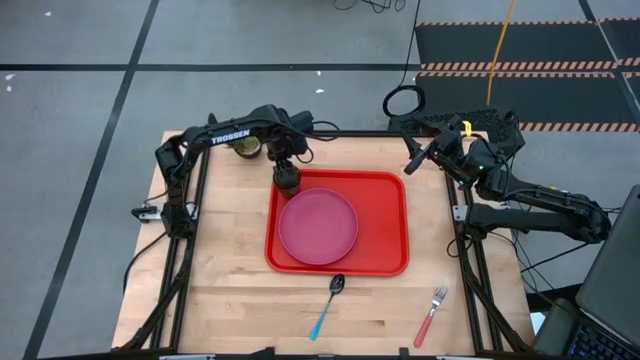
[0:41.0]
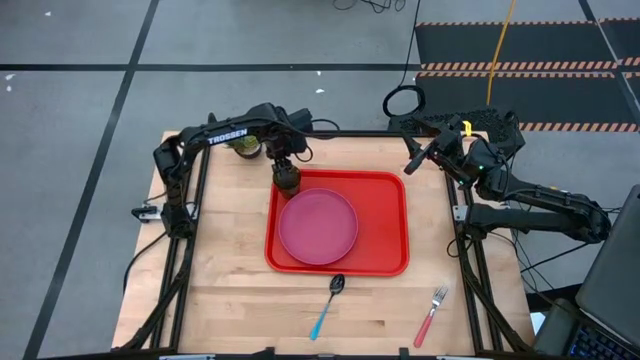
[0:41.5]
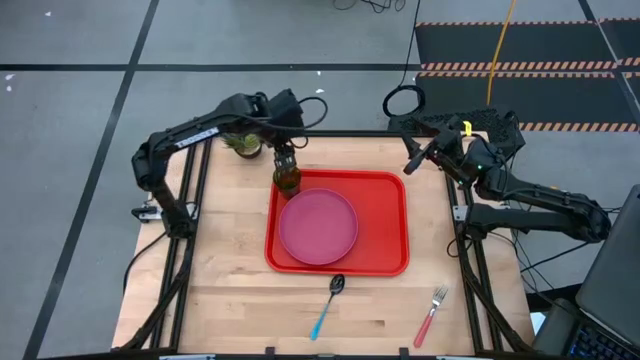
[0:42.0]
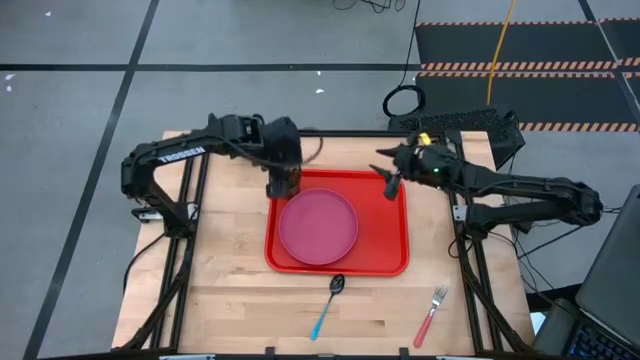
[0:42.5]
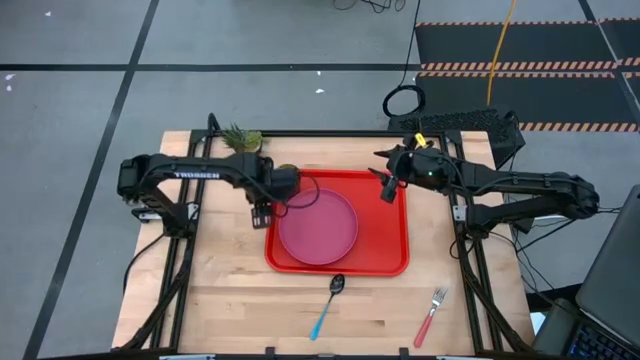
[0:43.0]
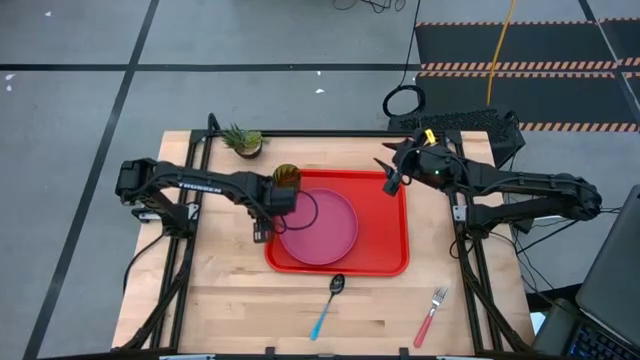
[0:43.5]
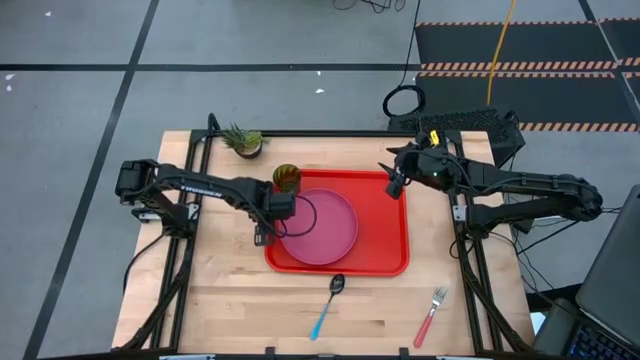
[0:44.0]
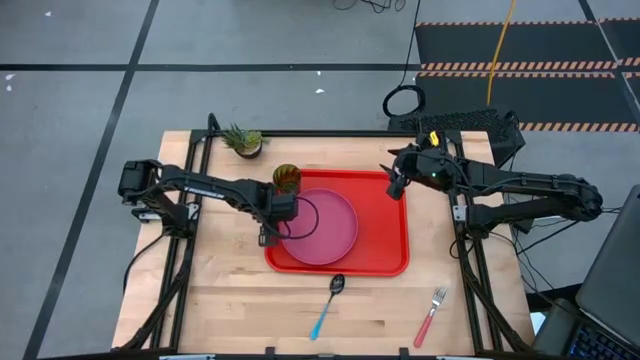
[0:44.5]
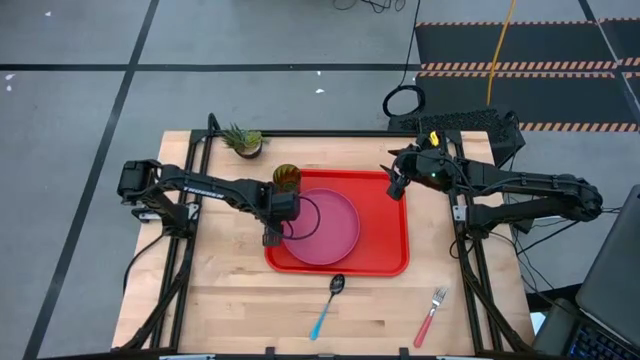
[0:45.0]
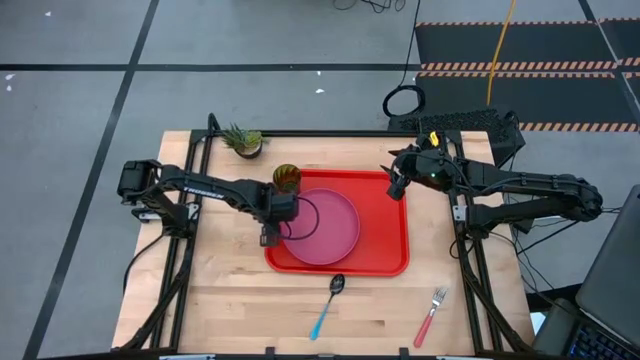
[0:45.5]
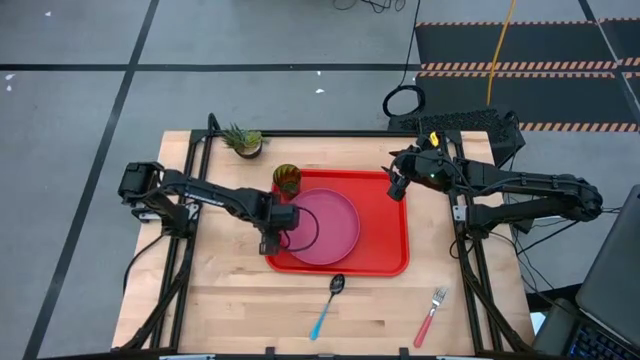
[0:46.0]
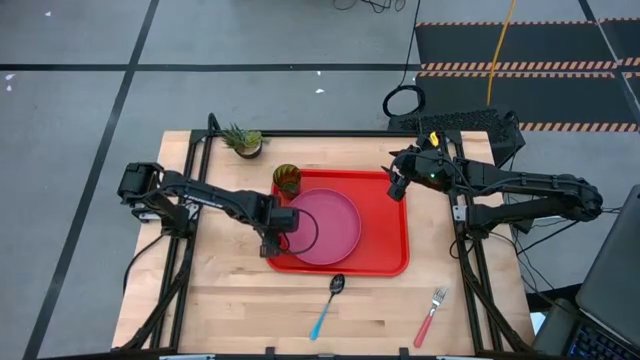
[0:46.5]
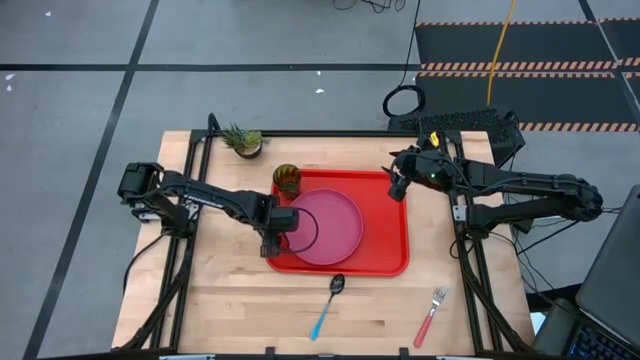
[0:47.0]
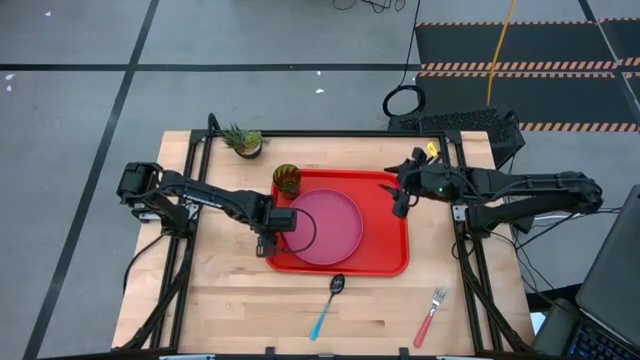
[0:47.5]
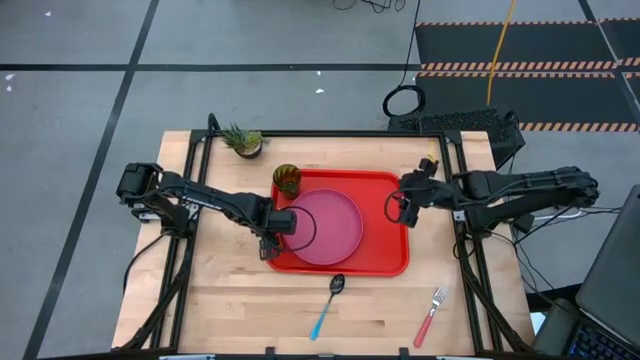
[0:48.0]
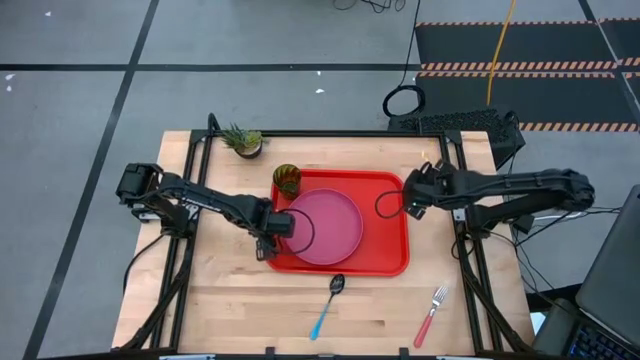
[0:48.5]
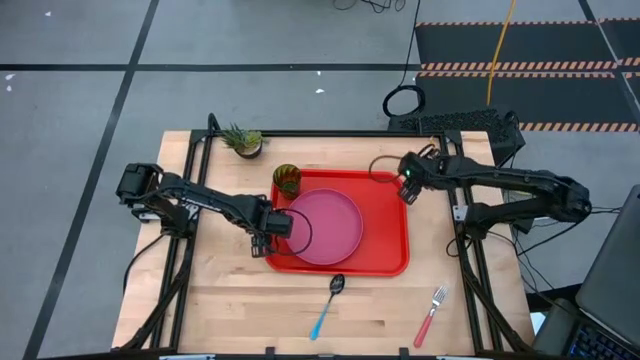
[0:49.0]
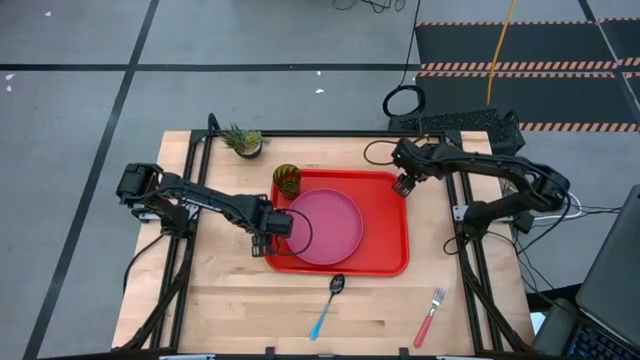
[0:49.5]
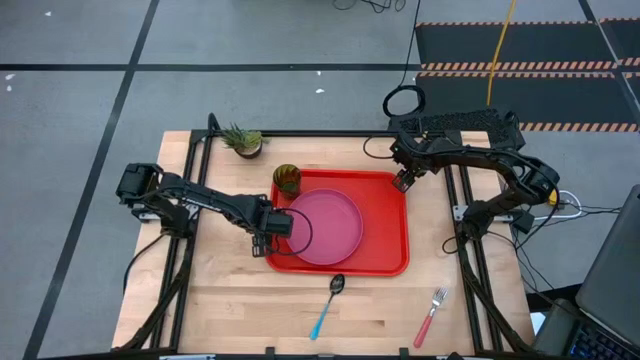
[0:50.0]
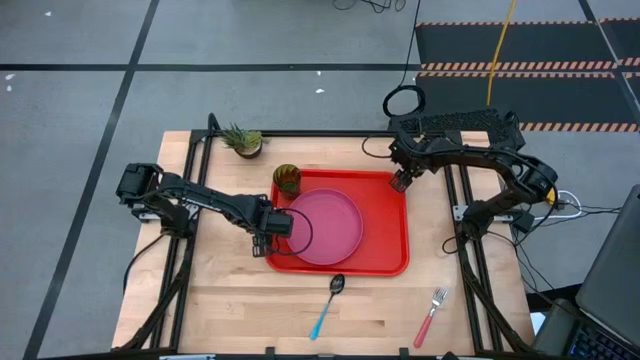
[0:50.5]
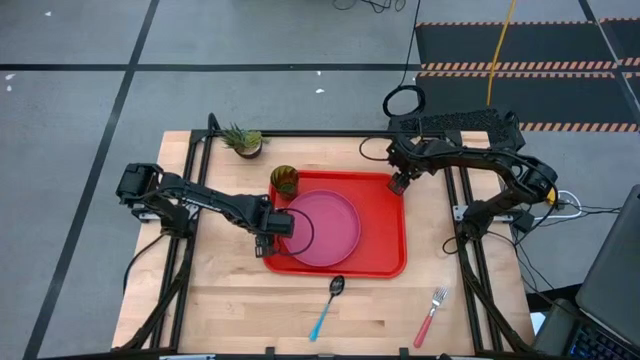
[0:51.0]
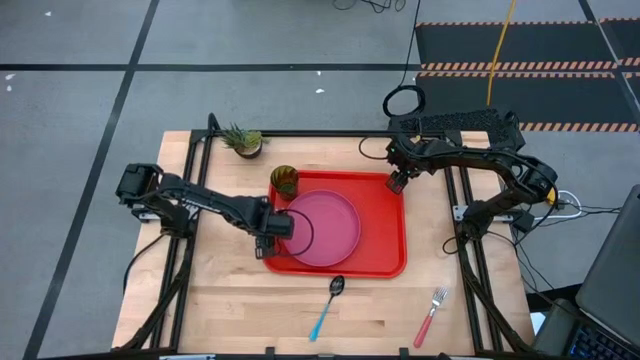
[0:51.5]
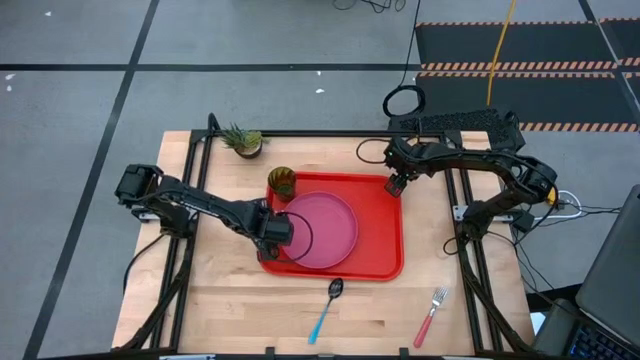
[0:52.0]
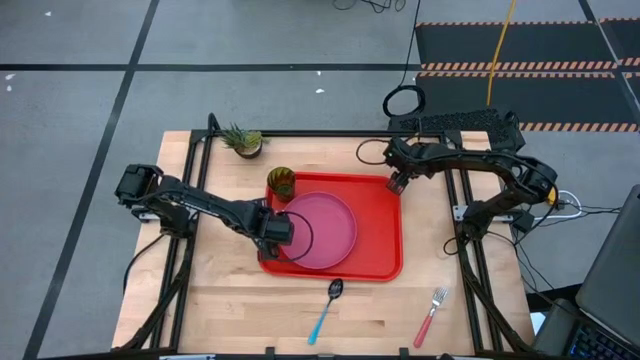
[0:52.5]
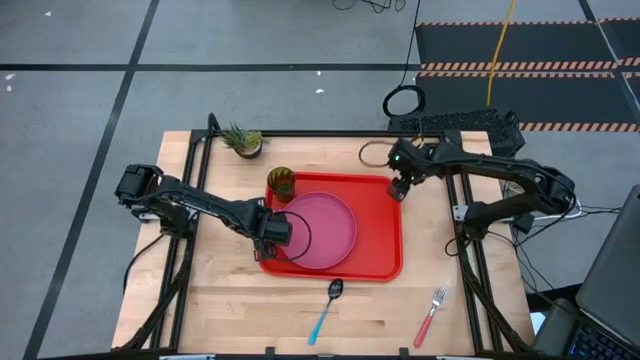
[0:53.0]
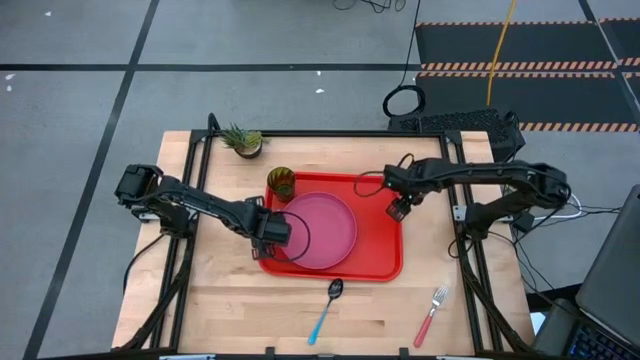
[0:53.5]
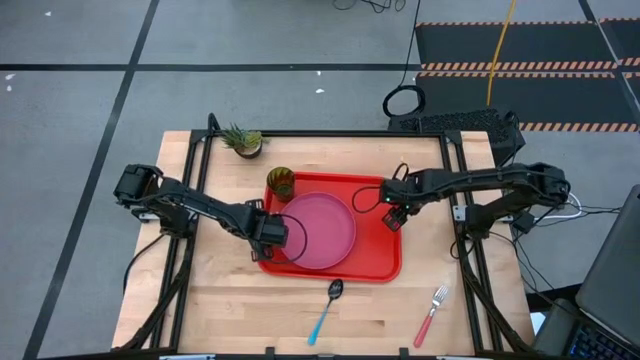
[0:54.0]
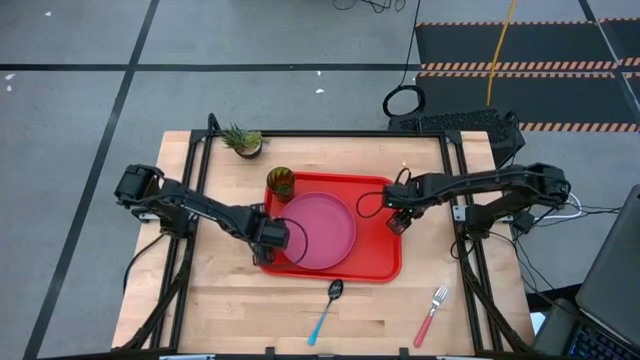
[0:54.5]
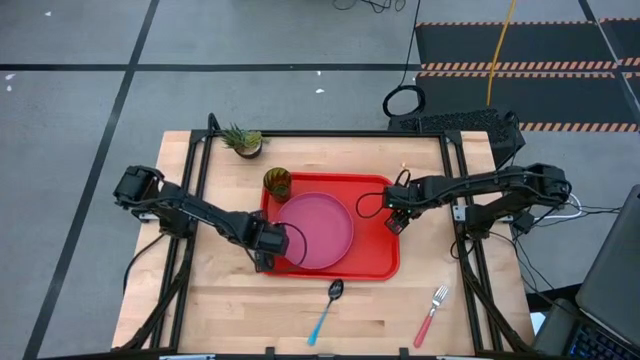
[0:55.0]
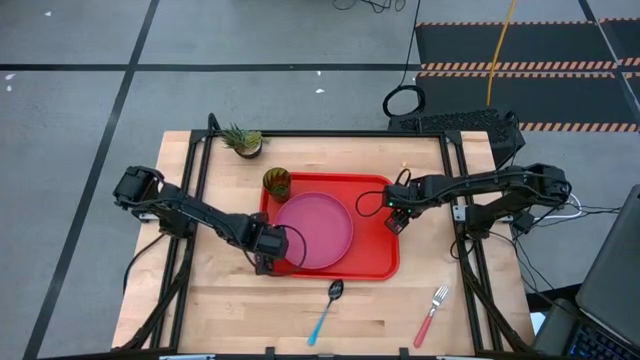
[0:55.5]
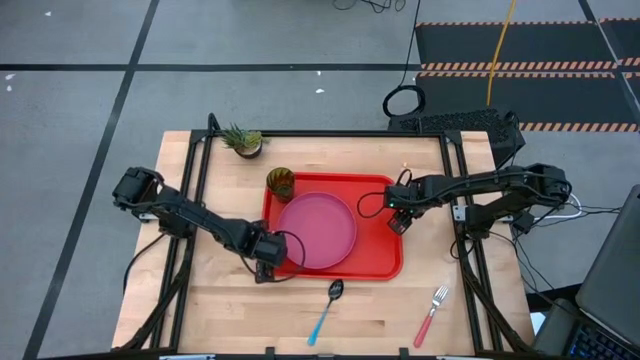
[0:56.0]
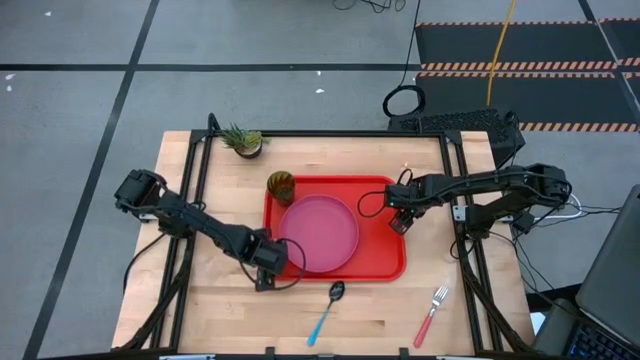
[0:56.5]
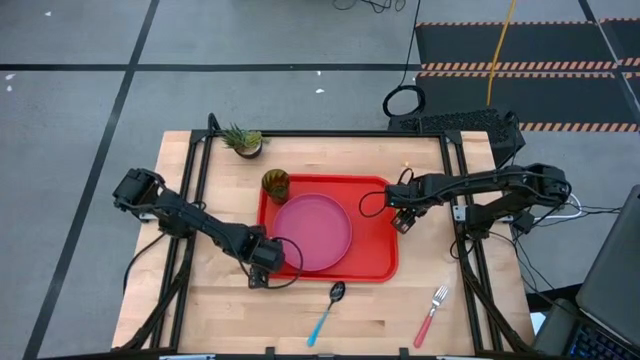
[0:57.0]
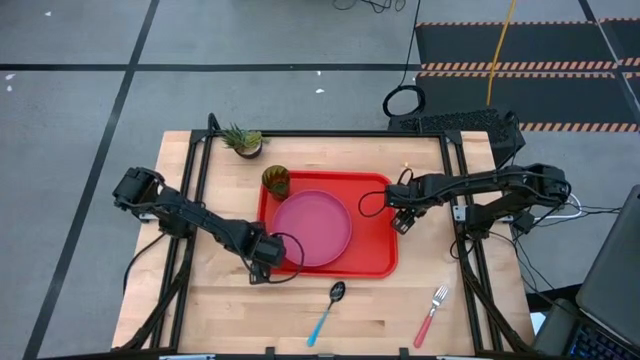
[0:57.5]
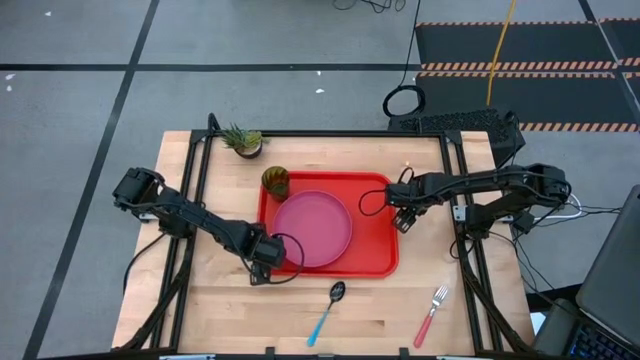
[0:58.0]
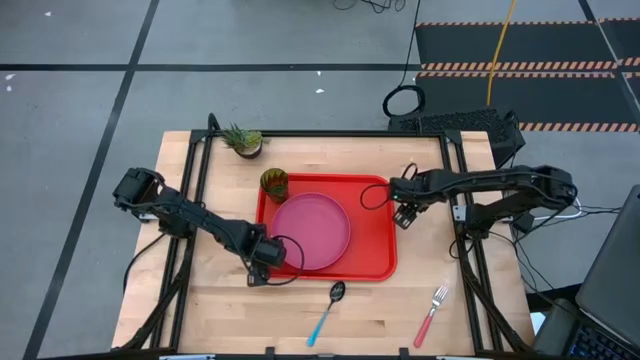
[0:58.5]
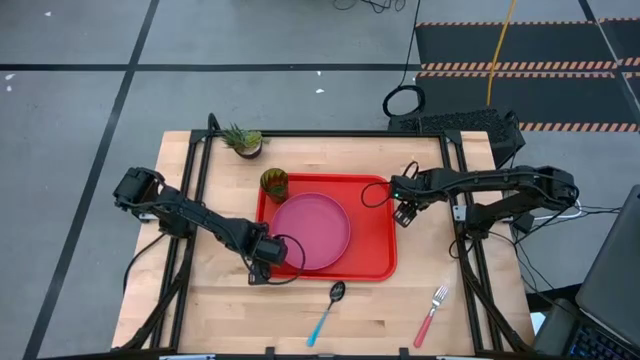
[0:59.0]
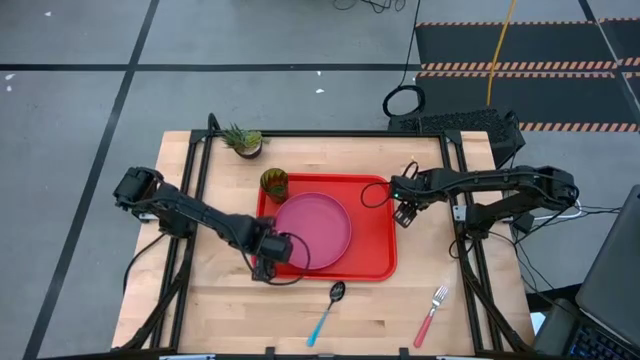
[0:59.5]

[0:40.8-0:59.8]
Task: Pick and place plate/cup/fork/spoon on tray
Adjust the orange tray

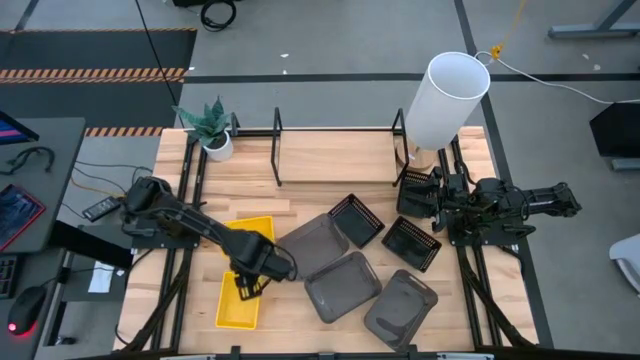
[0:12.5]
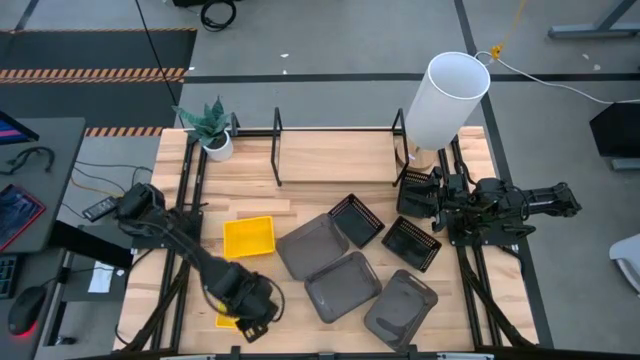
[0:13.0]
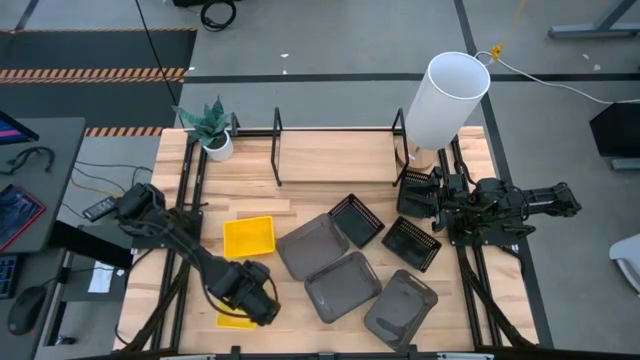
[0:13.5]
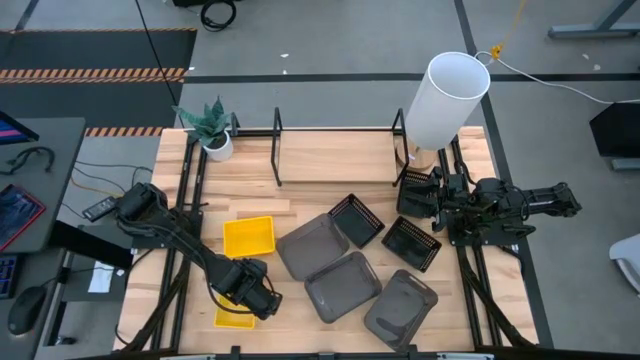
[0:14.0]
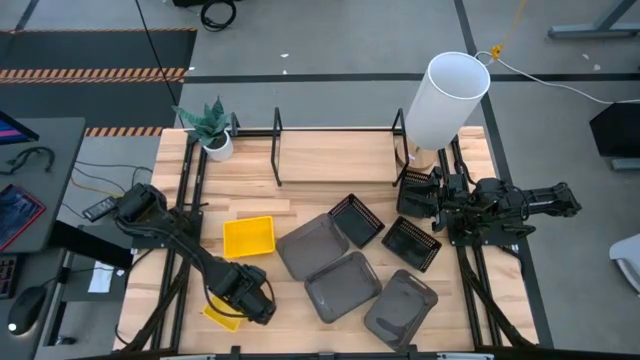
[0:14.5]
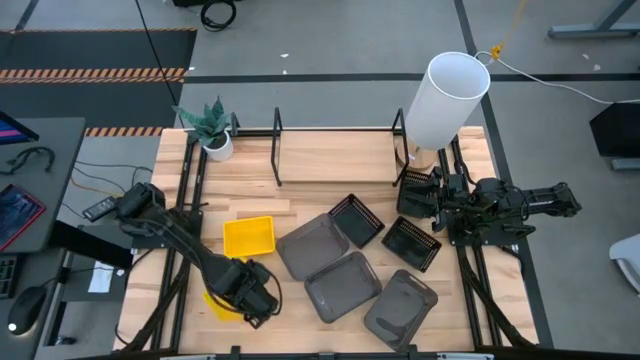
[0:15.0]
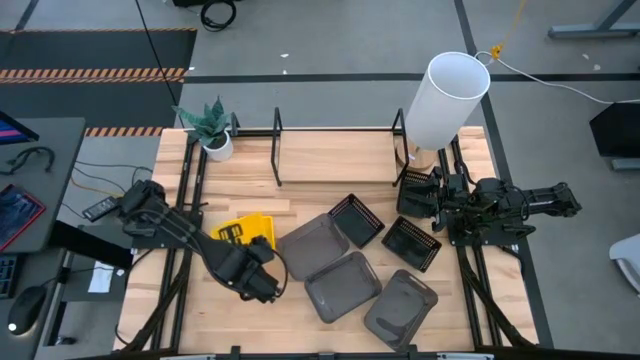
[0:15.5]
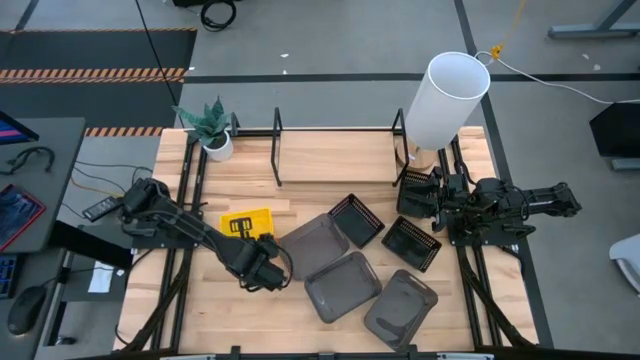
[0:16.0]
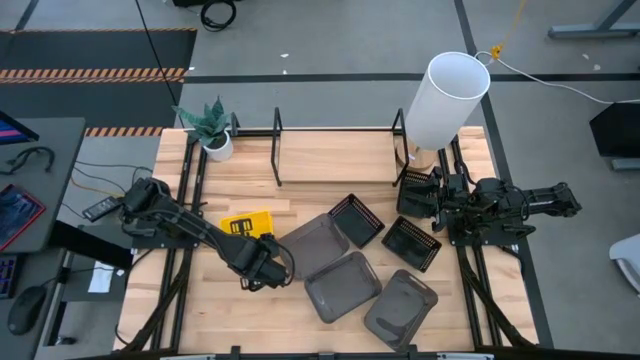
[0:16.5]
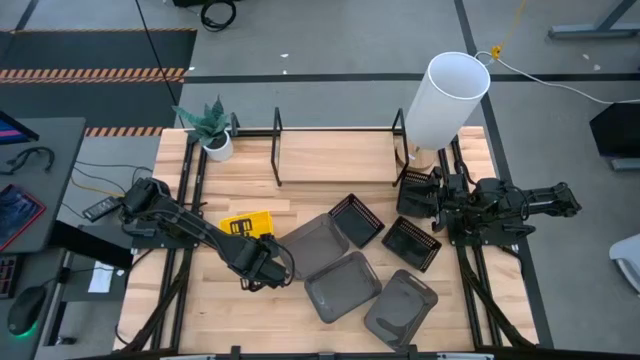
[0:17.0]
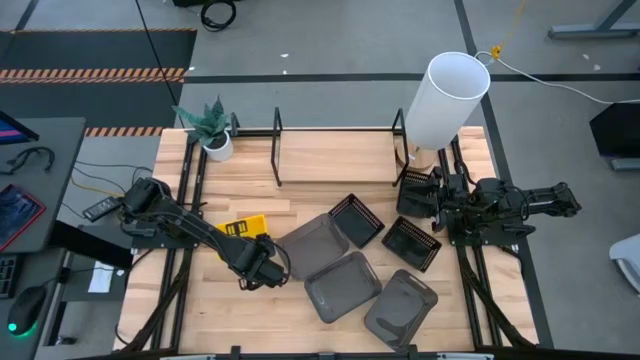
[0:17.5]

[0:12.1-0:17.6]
Task: Stack baskets on shelf by color
Stack the bottom yellow bin on the top yellow bin
